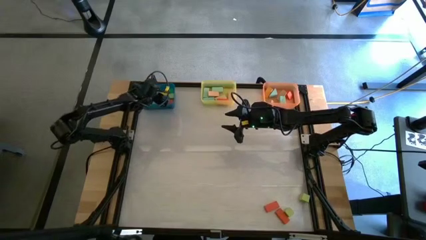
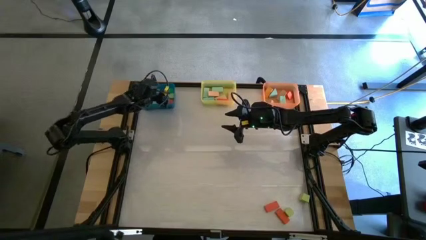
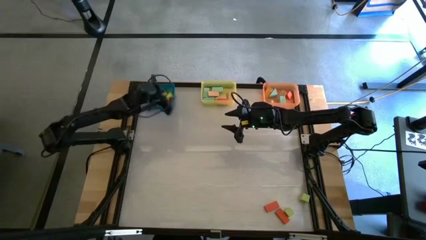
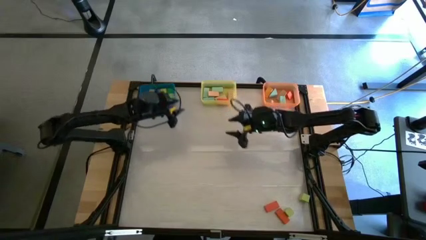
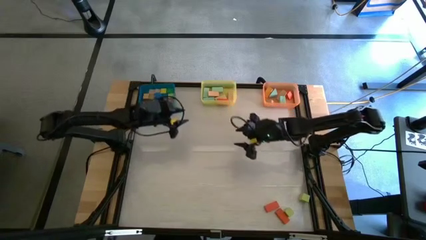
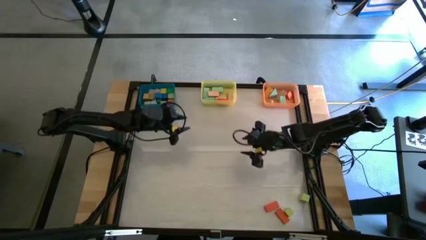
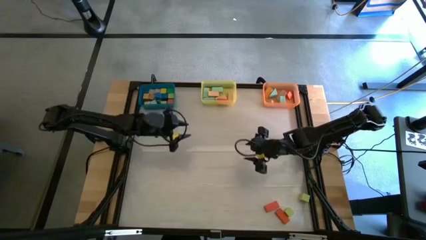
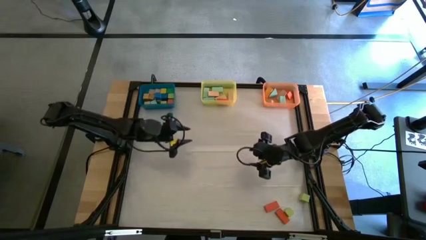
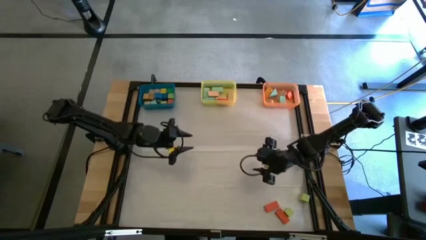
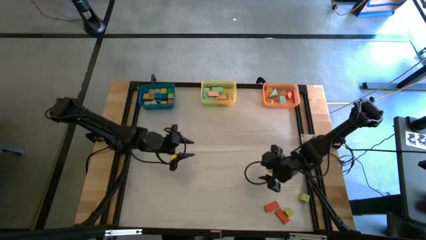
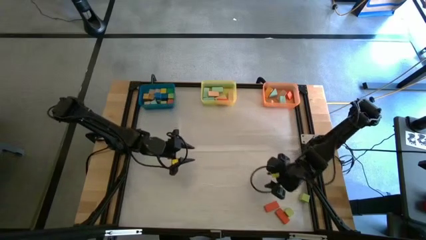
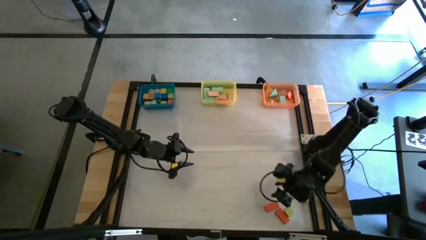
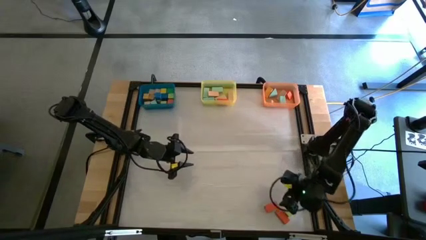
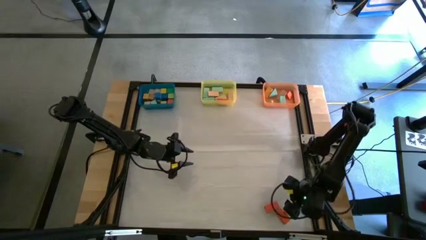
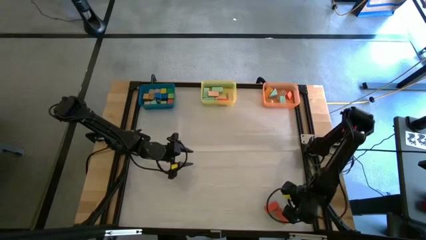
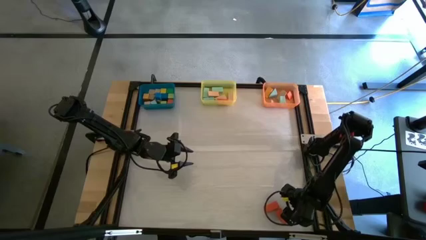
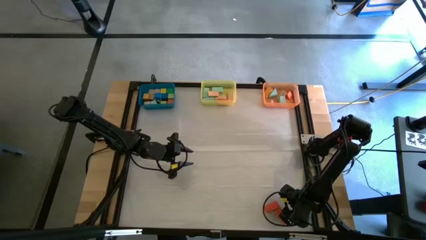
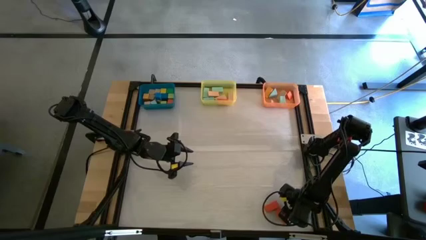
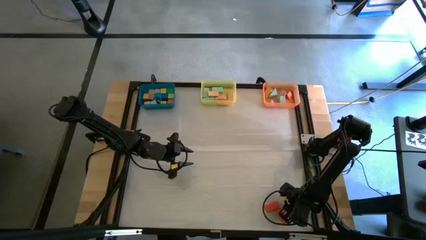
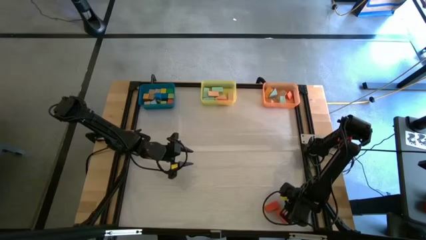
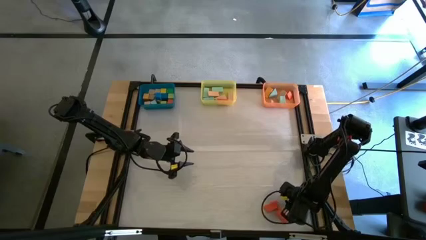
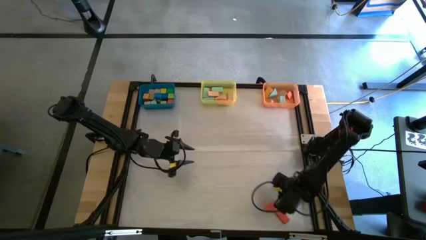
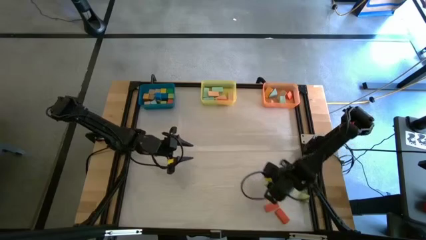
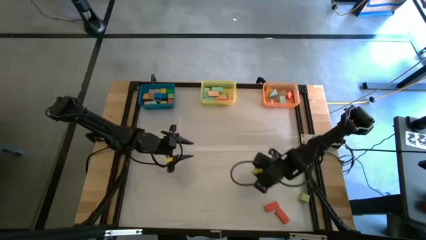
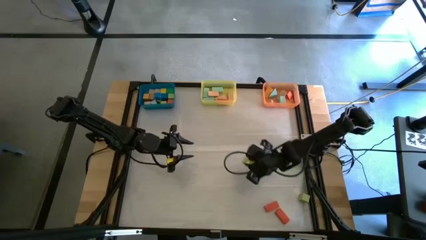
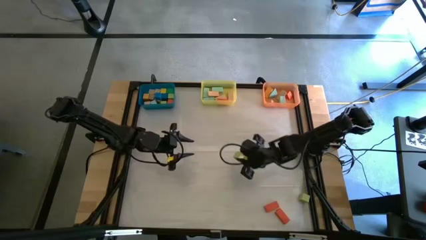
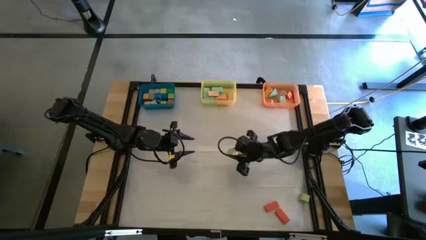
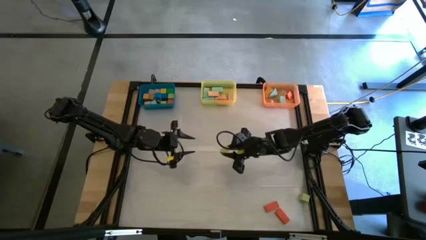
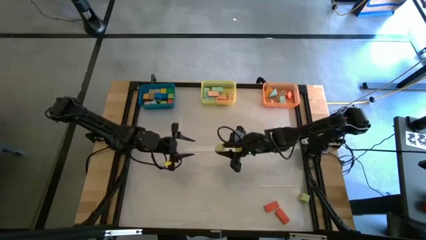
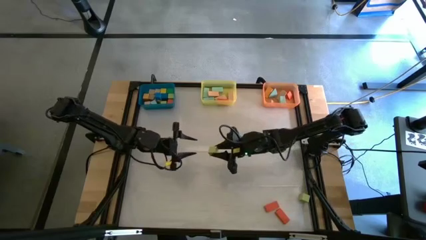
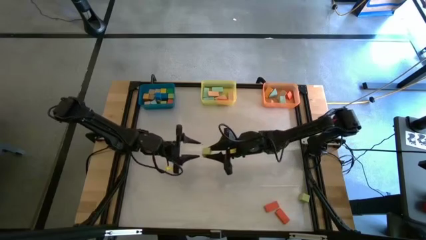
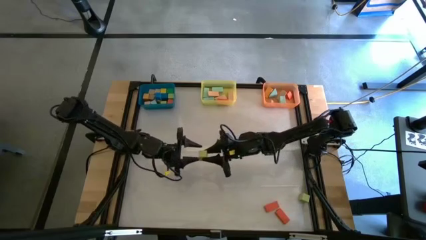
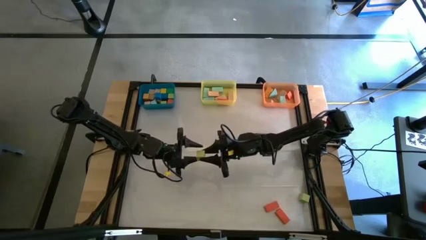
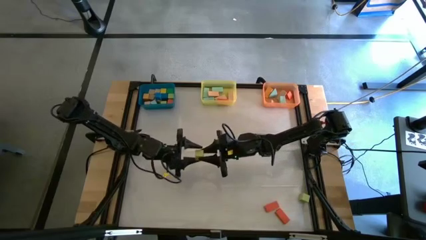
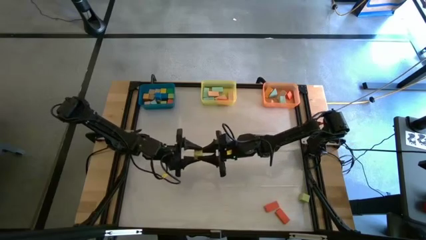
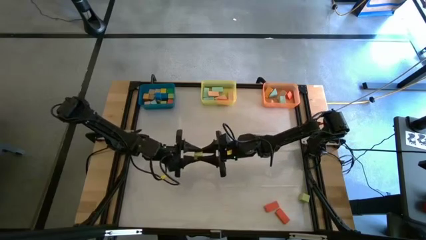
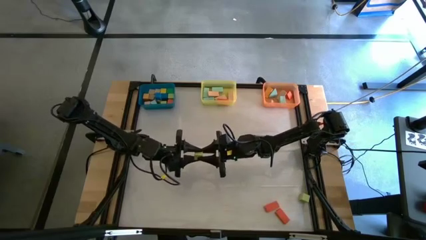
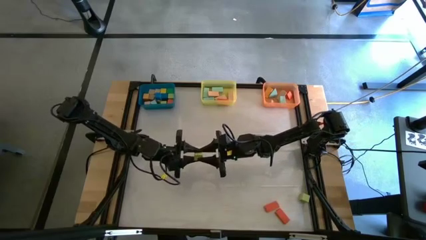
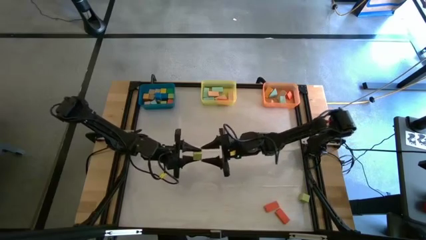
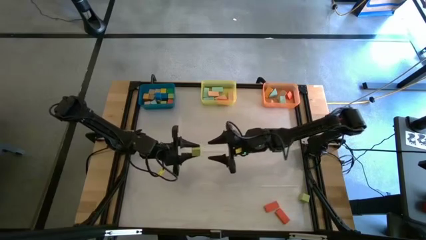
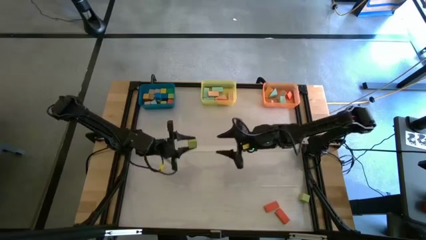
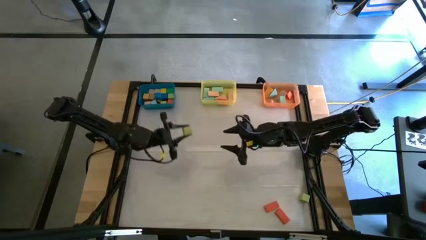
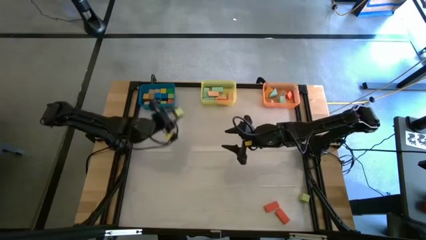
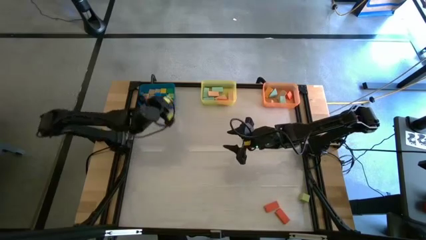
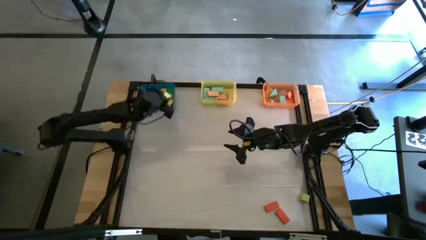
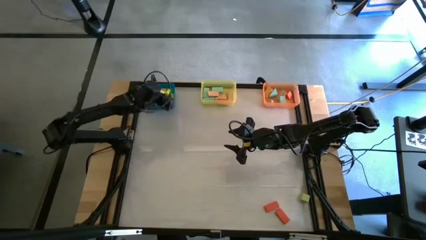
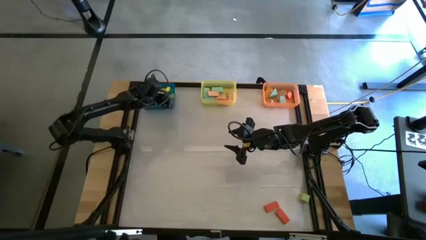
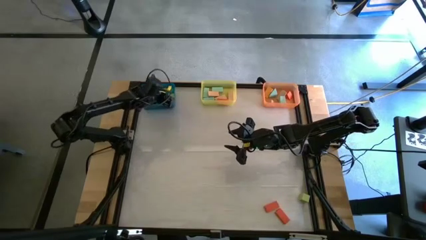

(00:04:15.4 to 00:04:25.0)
Task: Sort blocks by size
Put the light green square block into the blue bin

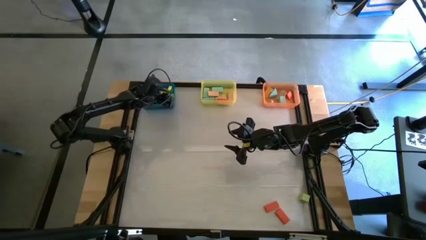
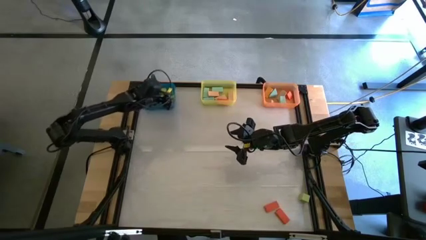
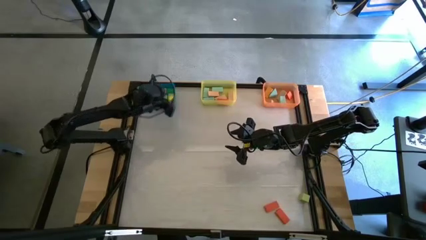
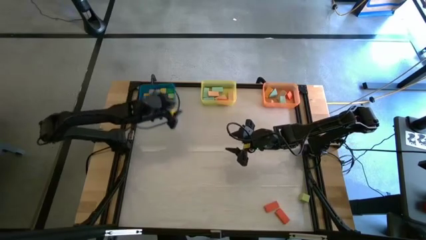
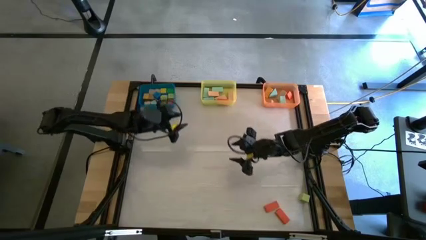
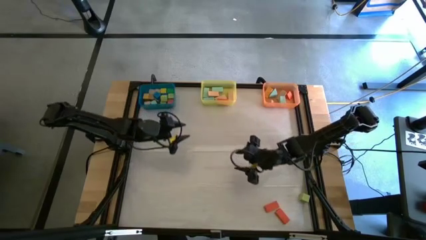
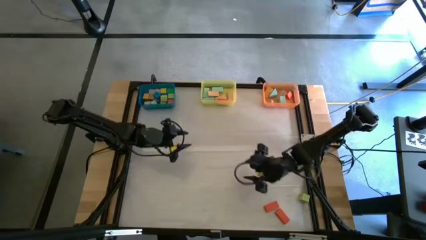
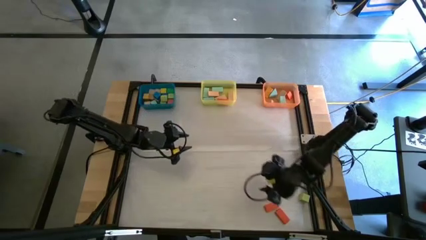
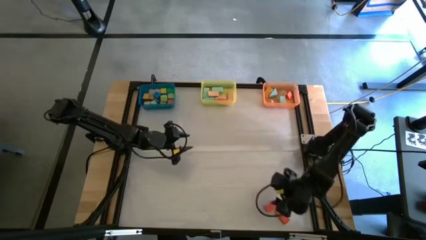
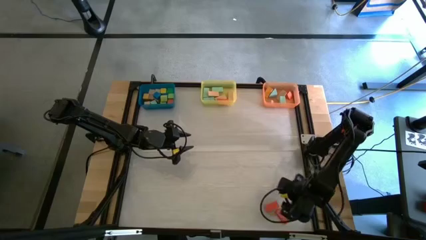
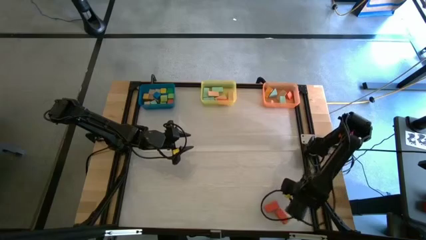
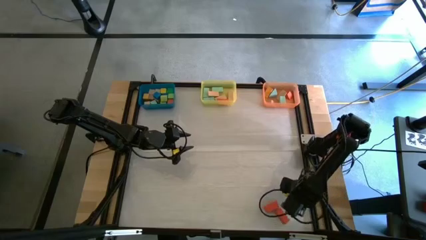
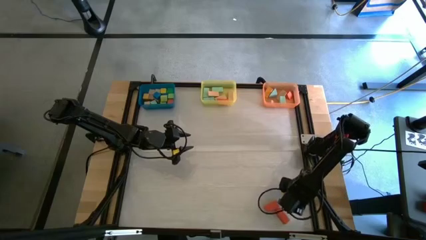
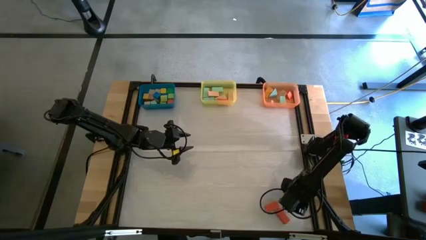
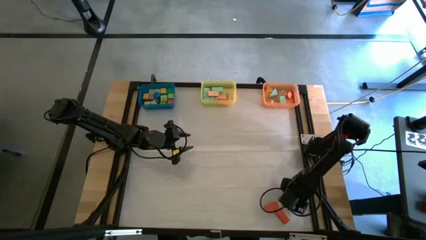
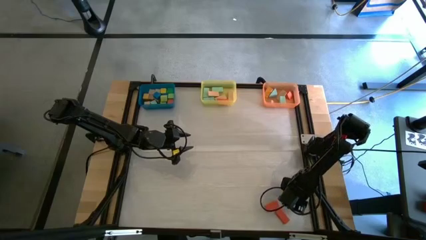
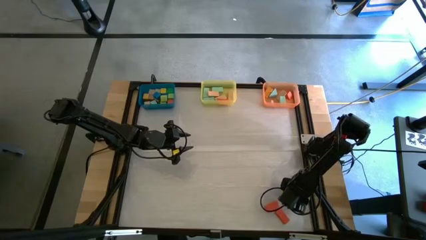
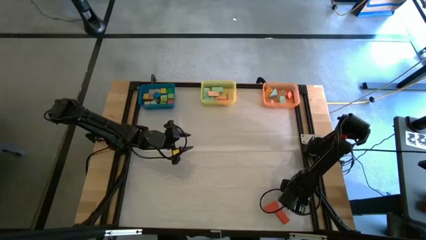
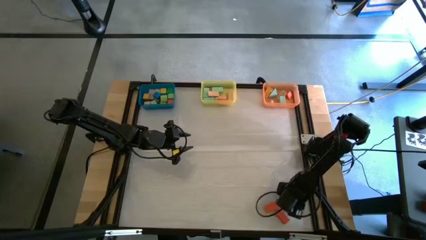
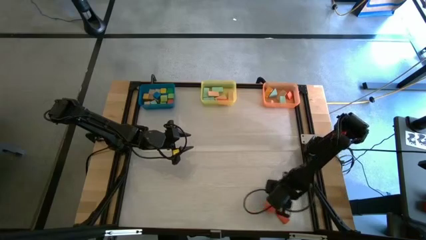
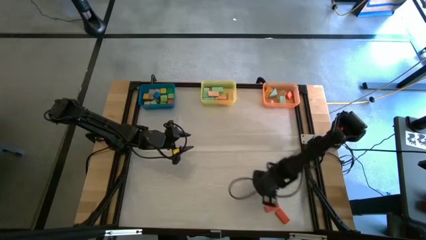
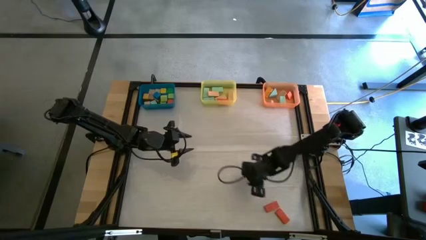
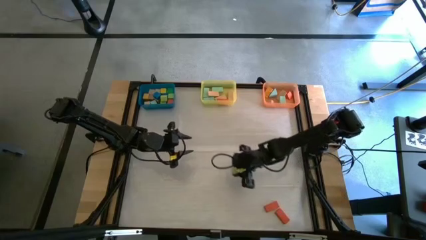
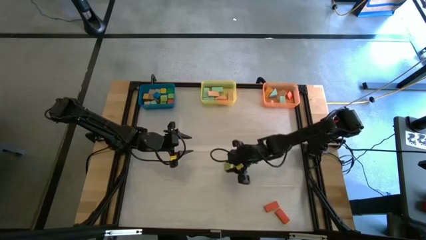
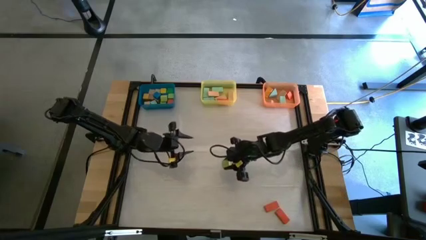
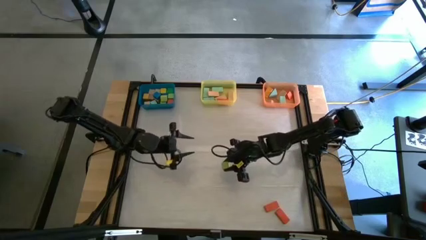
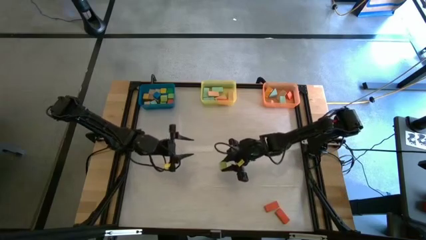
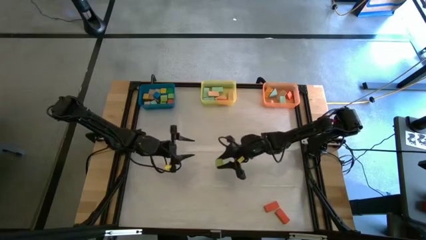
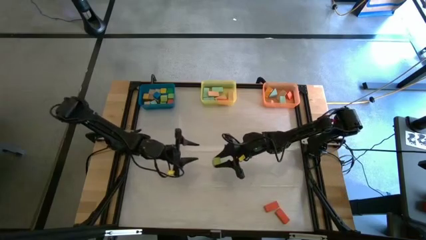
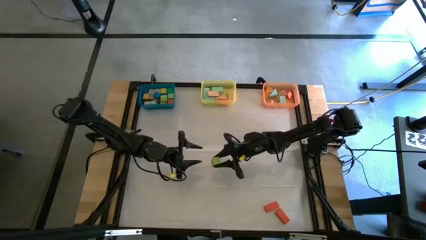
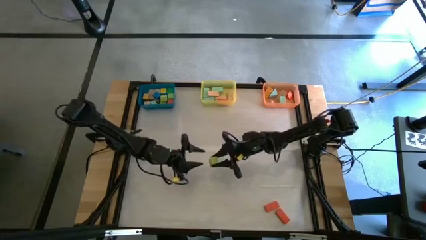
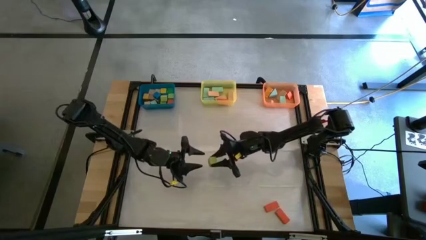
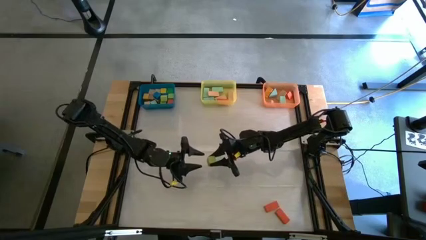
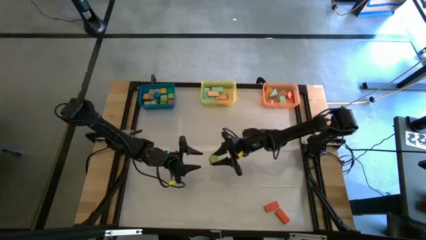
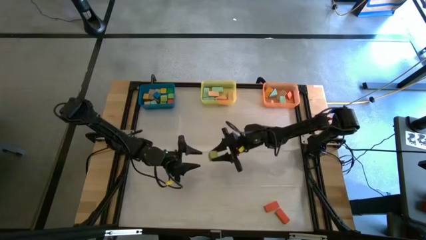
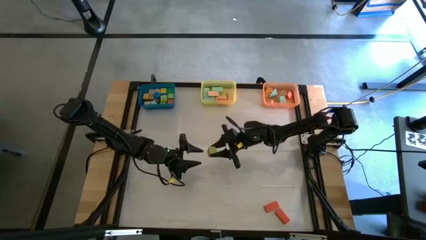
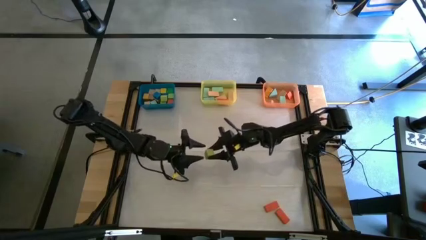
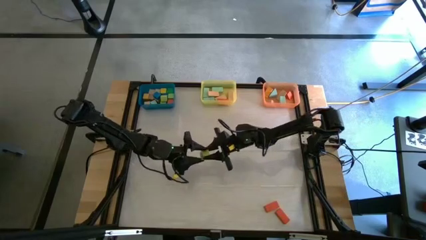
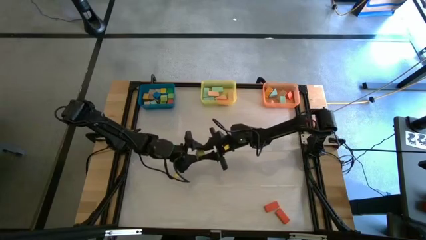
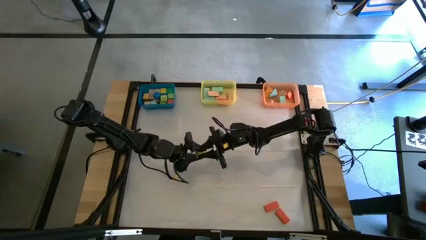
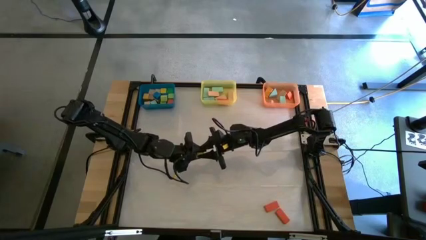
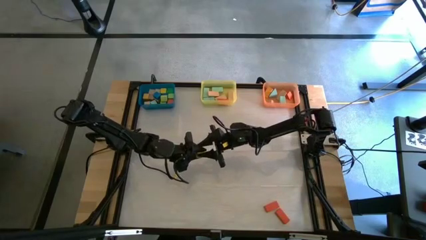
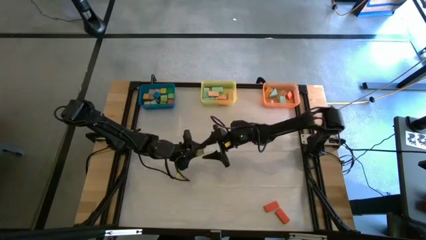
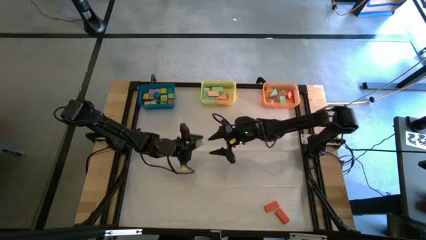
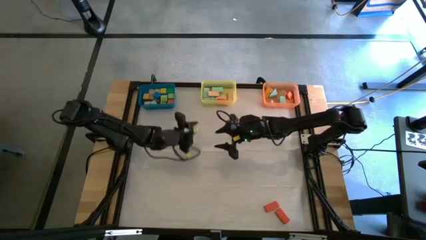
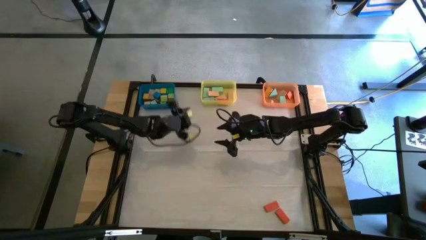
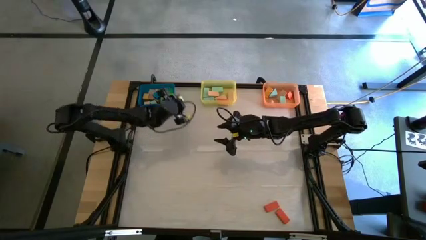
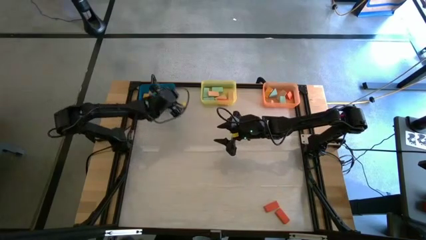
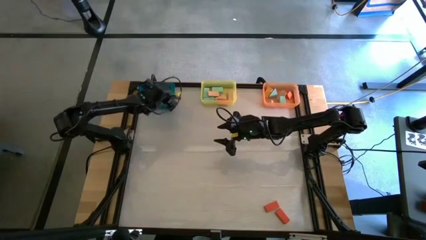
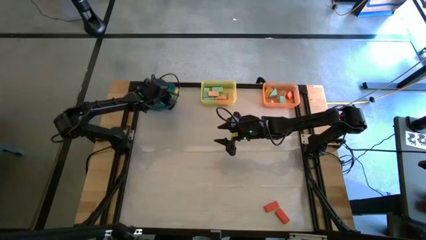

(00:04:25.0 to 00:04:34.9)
Put the light green square block into the blue bin
